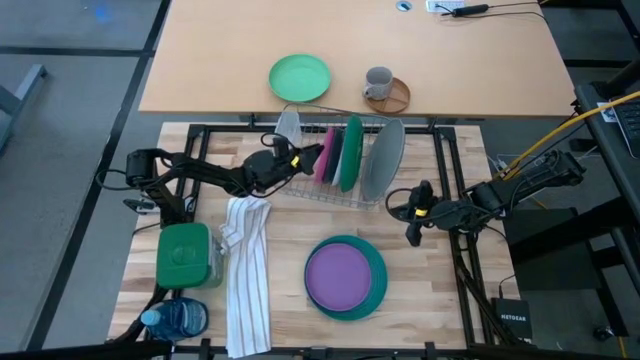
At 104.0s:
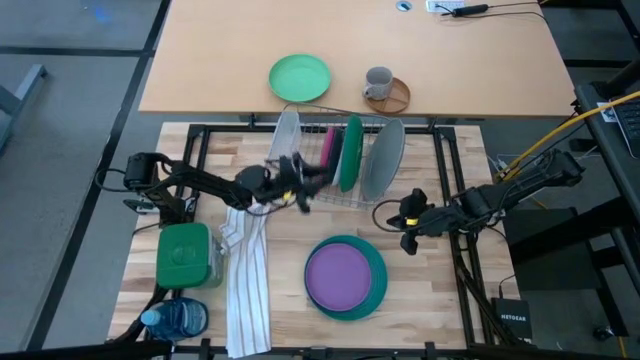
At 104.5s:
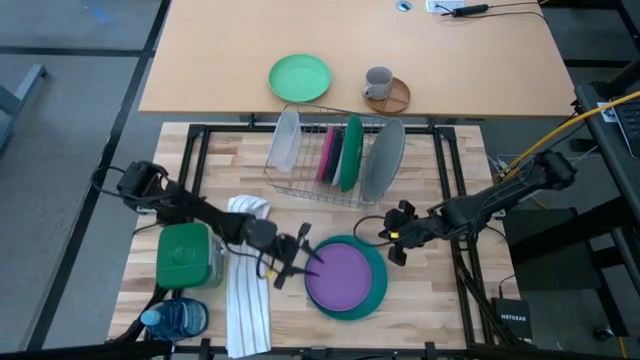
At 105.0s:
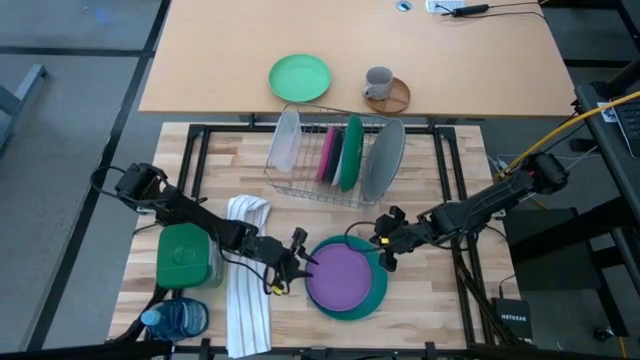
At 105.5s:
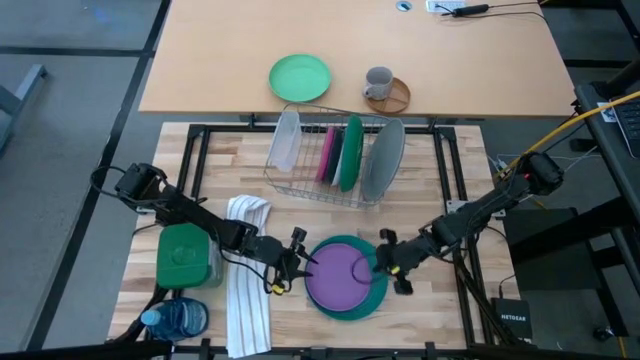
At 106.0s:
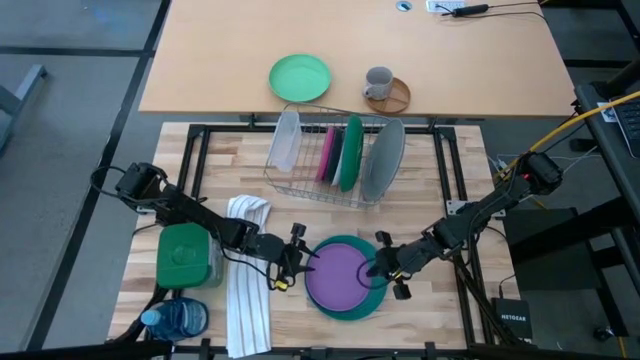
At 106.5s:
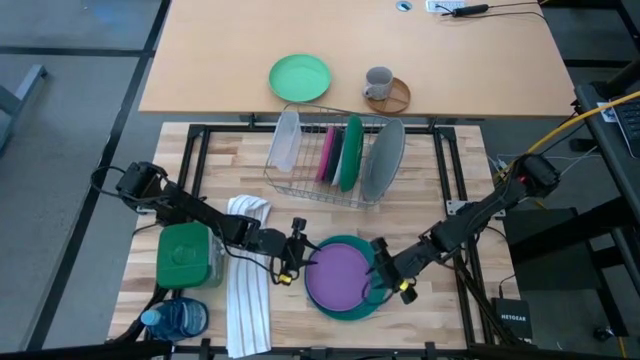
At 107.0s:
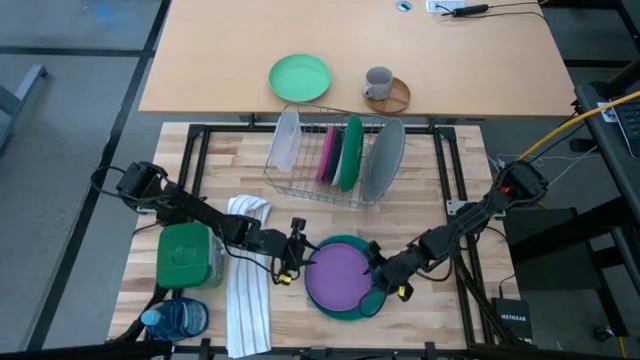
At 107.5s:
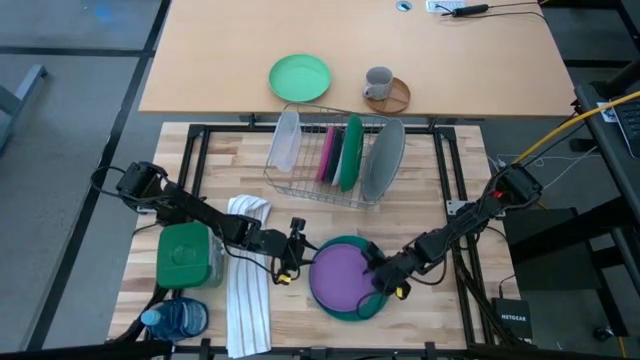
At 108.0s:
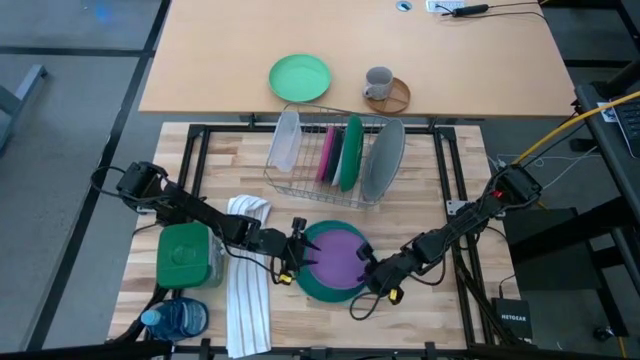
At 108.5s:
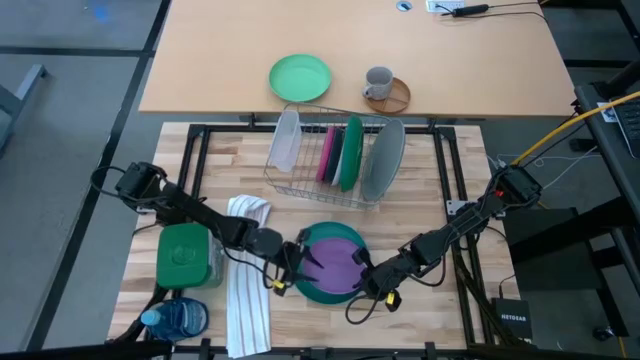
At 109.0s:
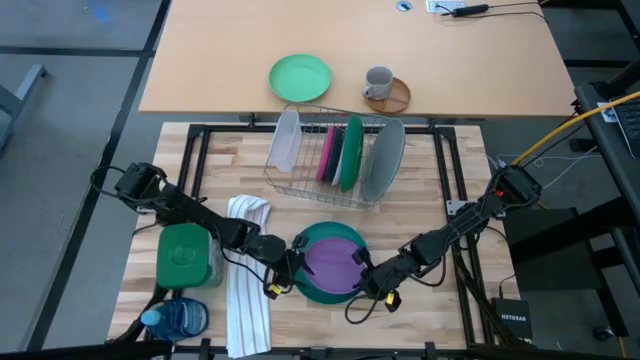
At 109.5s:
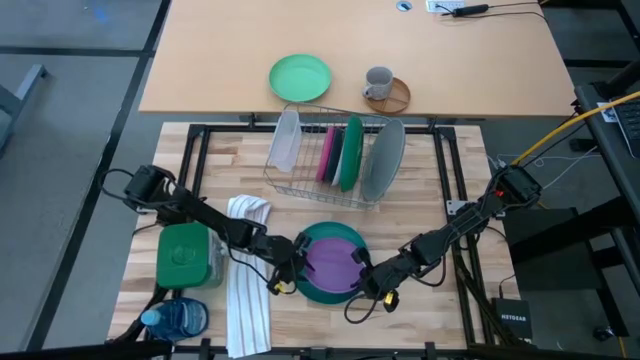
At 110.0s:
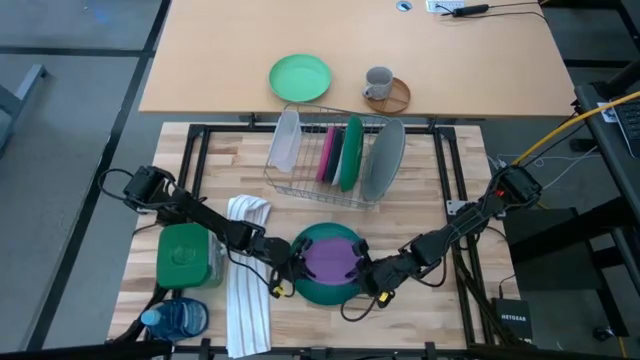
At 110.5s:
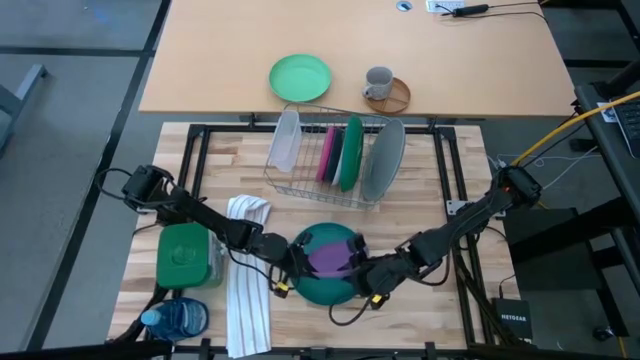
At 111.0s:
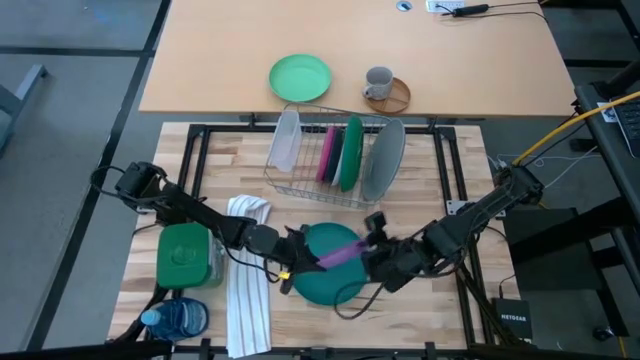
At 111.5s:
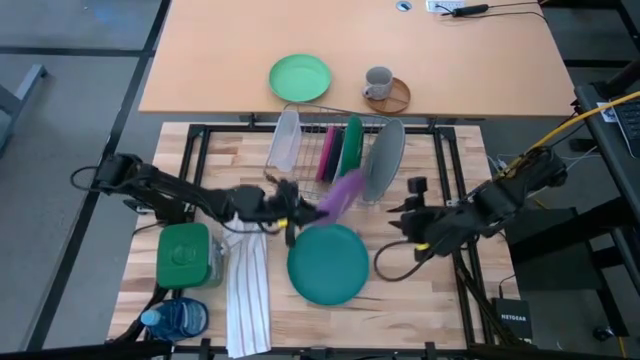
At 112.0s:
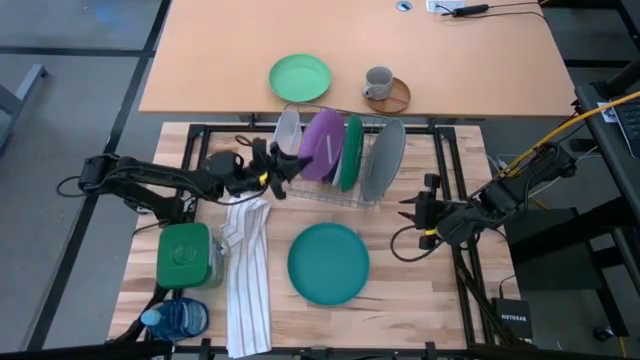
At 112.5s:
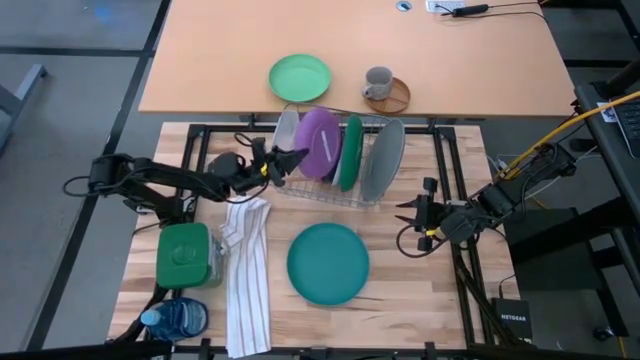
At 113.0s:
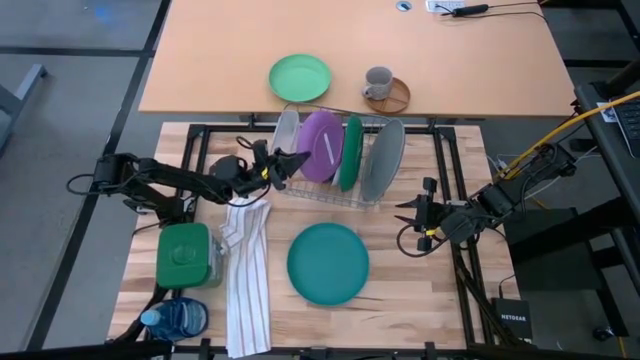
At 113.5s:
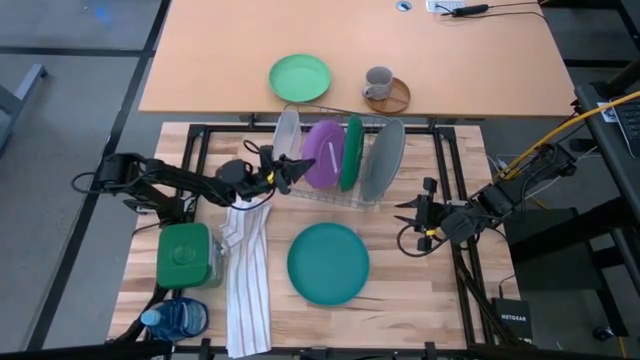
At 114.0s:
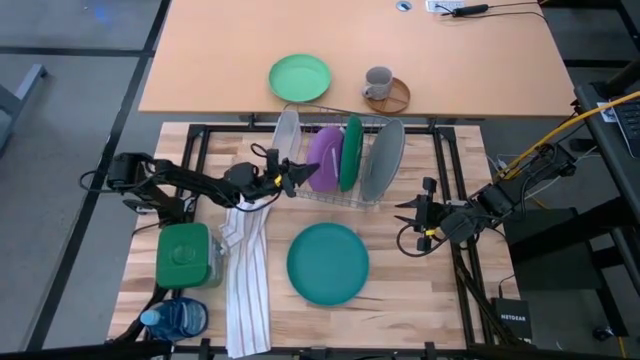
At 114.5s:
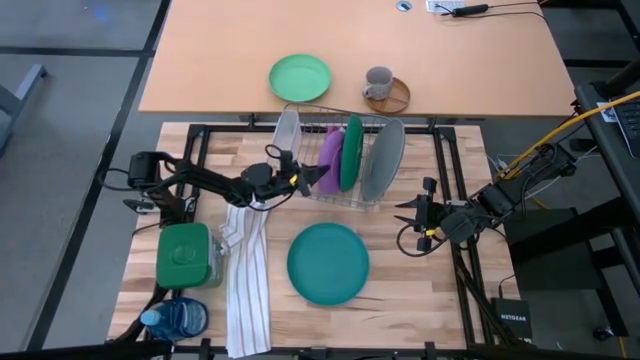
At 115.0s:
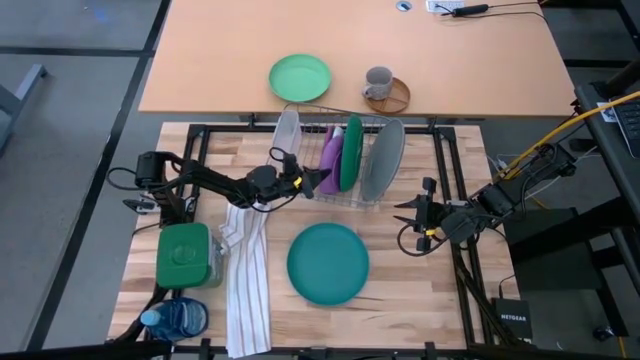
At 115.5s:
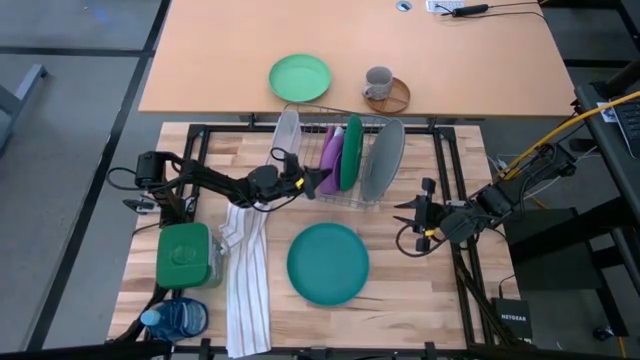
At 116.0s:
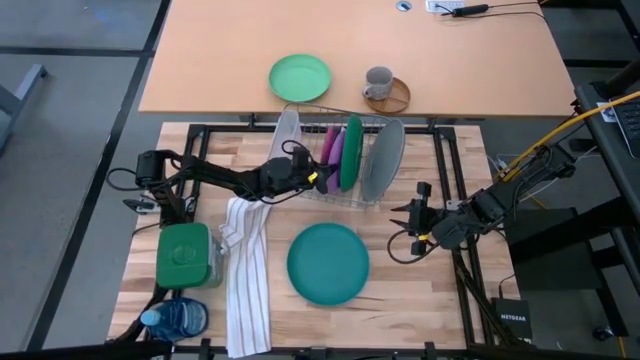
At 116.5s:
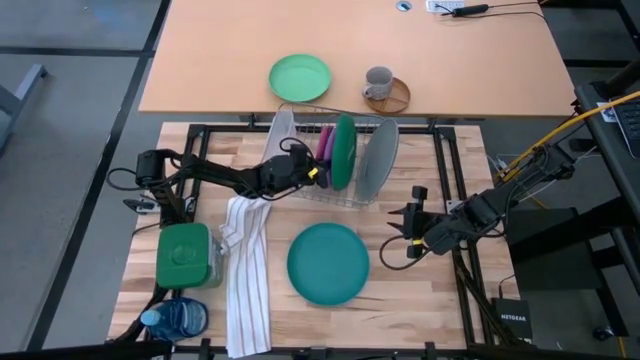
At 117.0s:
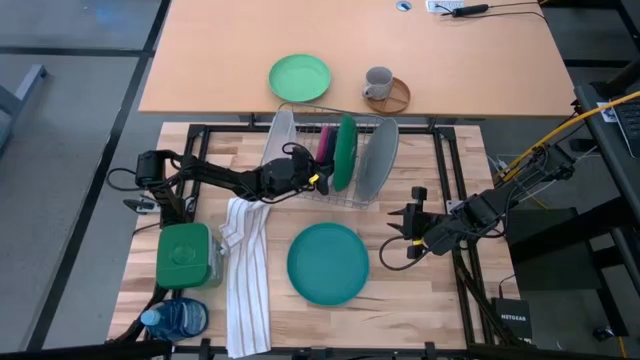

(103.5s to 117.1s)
Task: Sort dishes
Put the violet plate in the dish rack

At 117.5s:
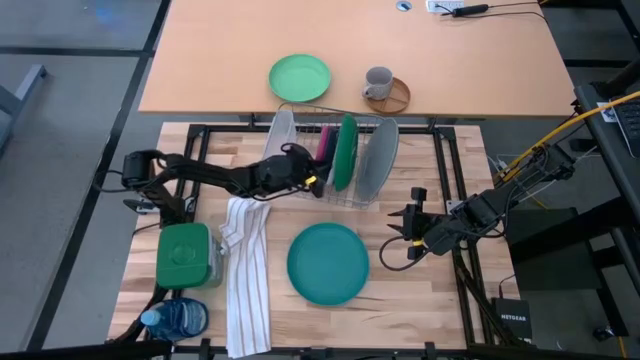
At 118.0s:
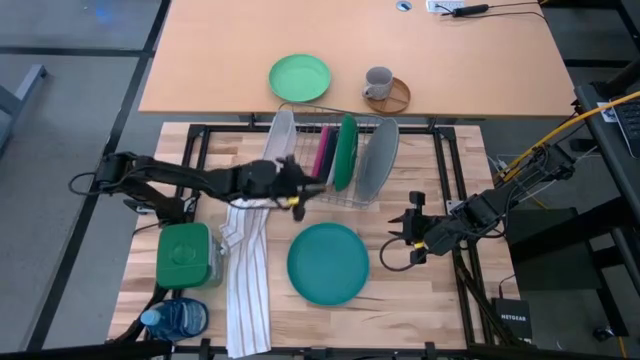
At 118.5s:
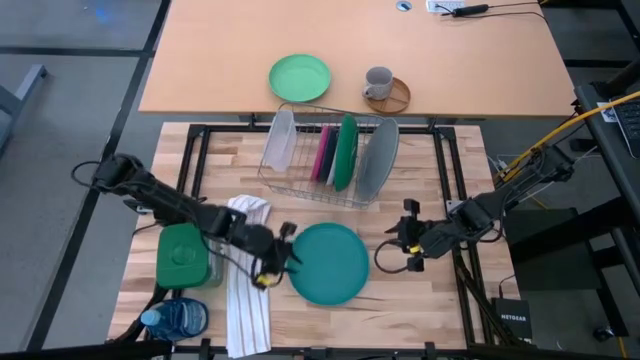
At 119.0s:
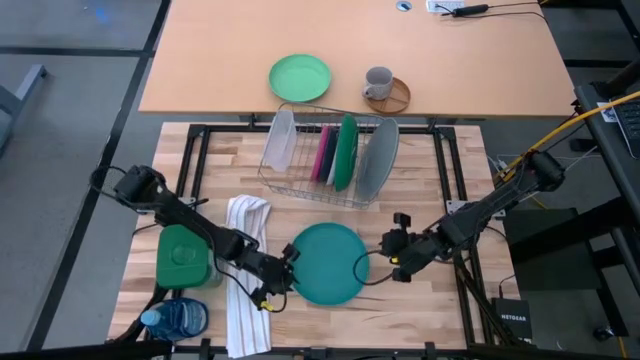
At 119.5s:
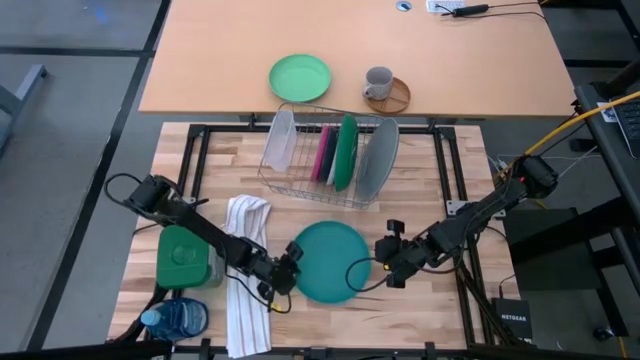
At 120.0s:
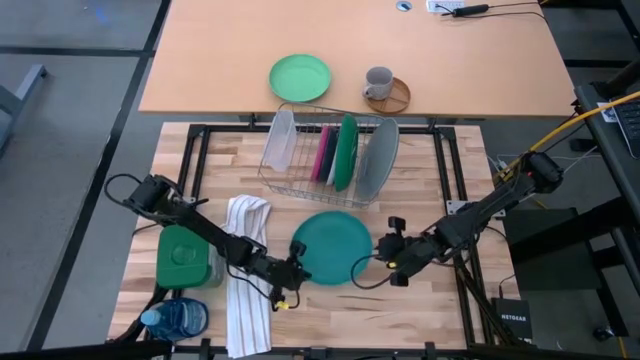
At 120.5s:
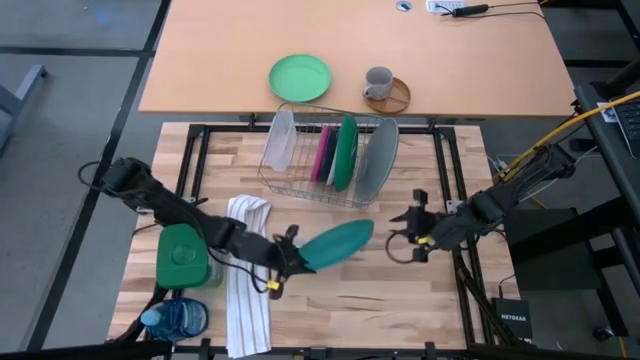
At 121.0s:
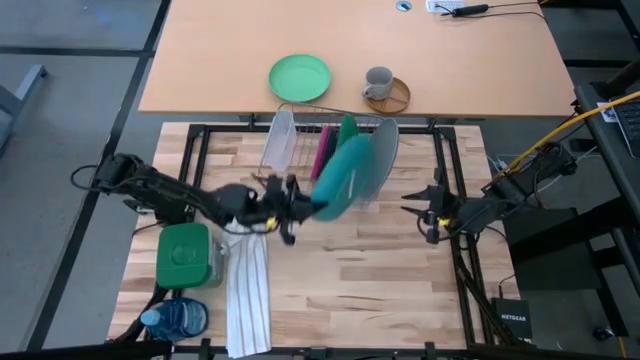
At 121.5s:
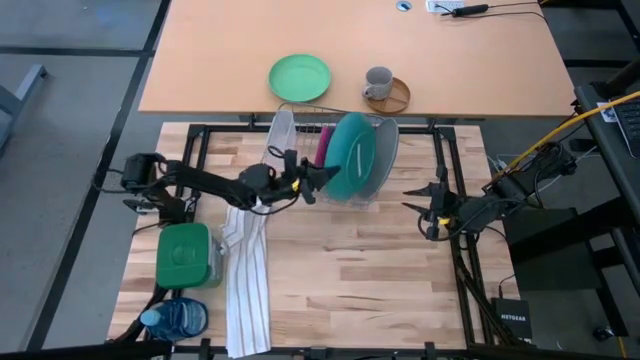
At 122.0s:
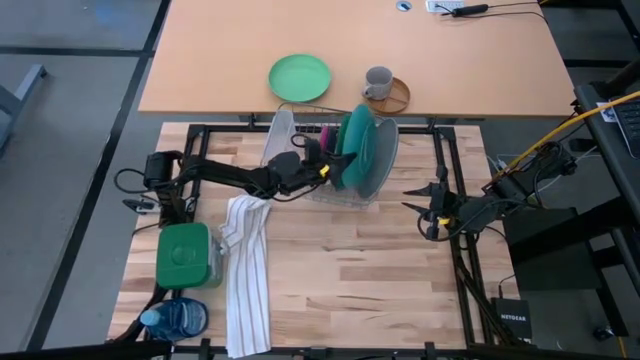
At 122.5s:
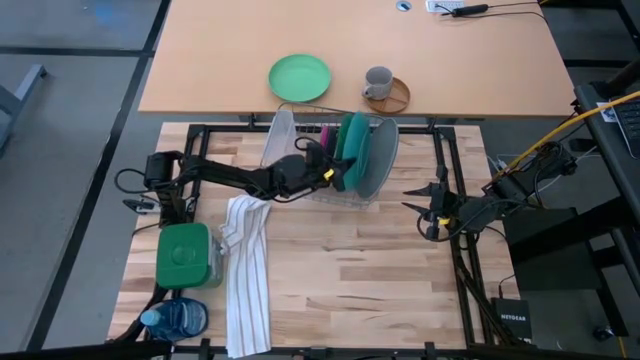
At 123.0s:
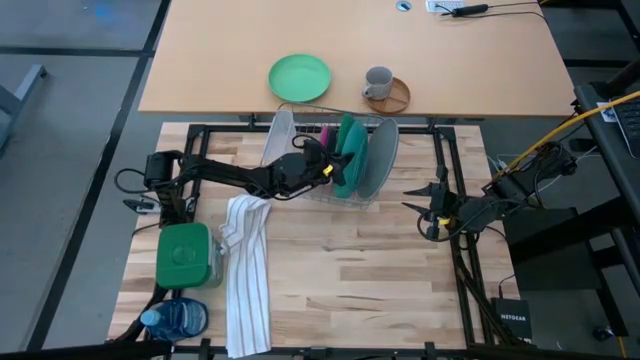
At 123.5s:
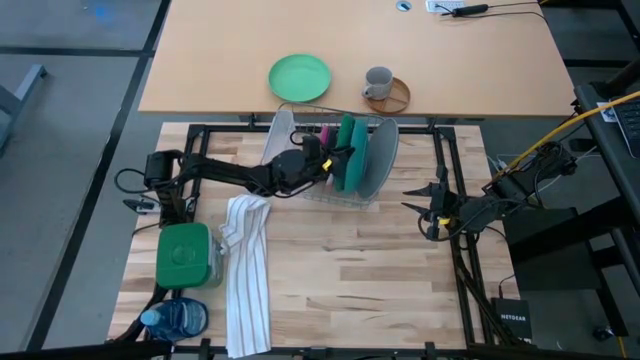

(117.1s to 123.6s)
Put the light blue plate in the dish rack
